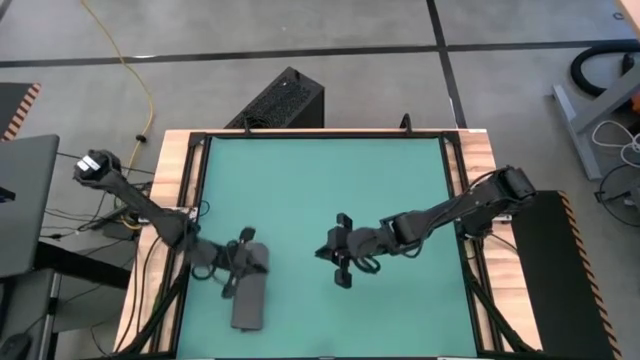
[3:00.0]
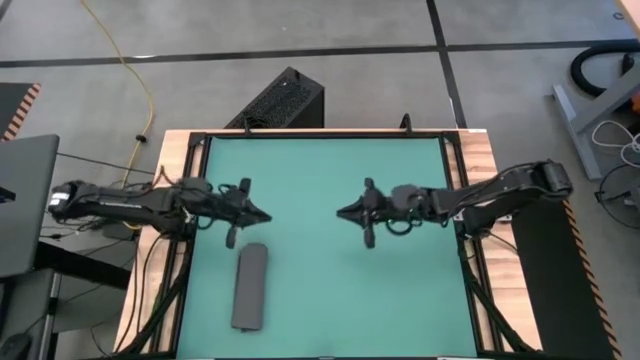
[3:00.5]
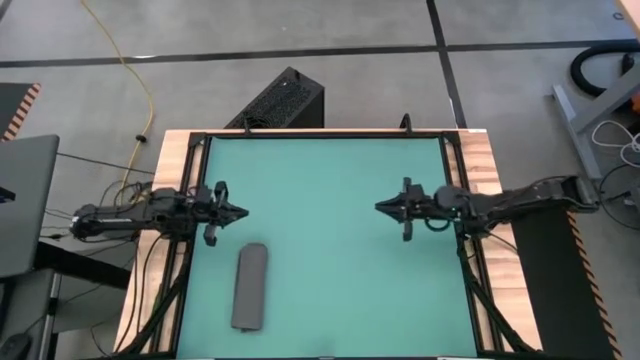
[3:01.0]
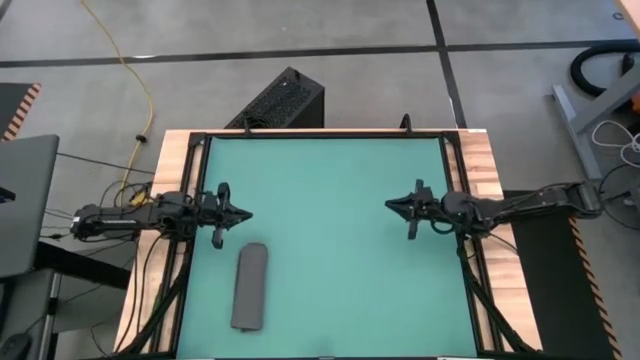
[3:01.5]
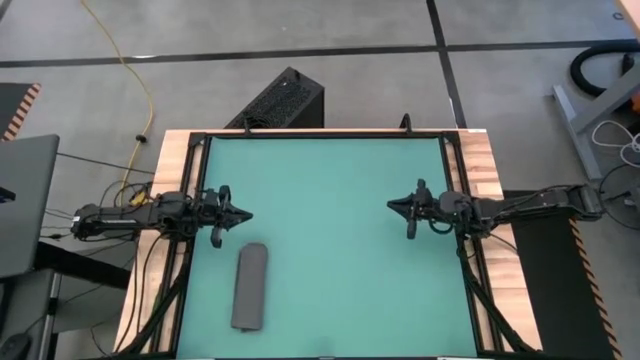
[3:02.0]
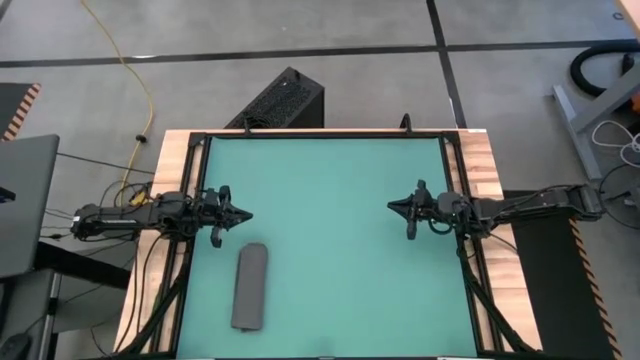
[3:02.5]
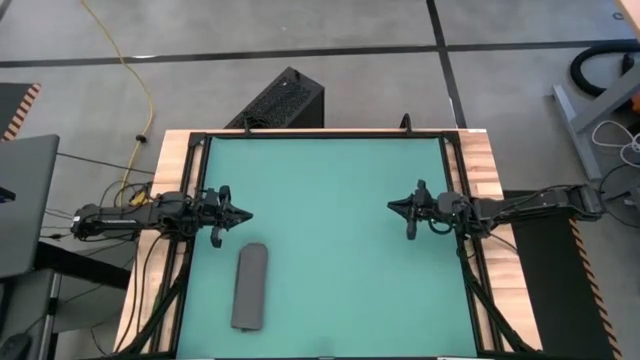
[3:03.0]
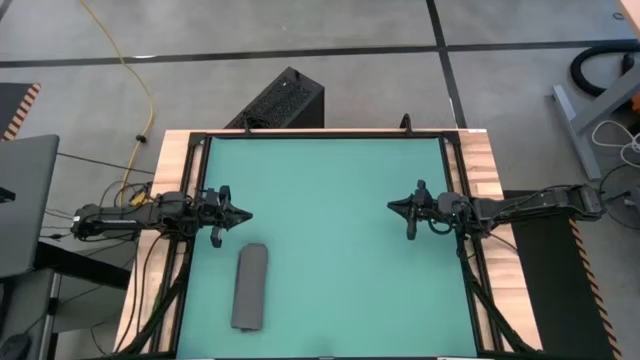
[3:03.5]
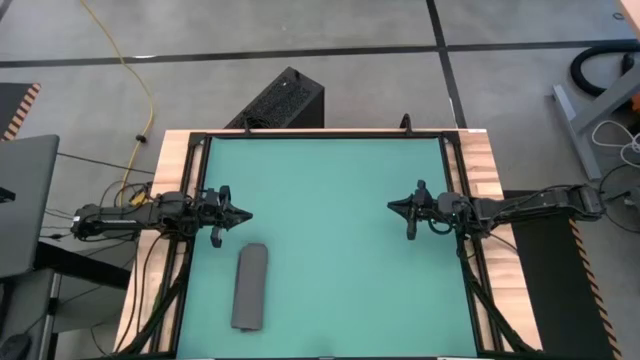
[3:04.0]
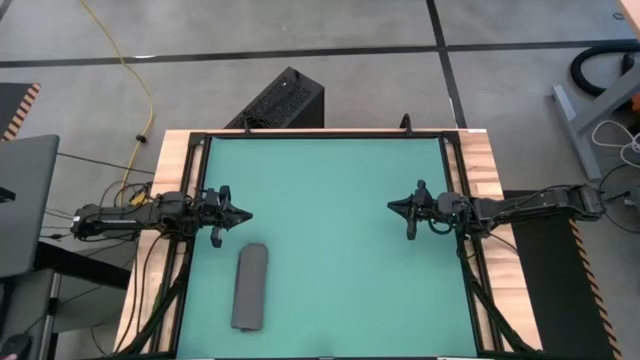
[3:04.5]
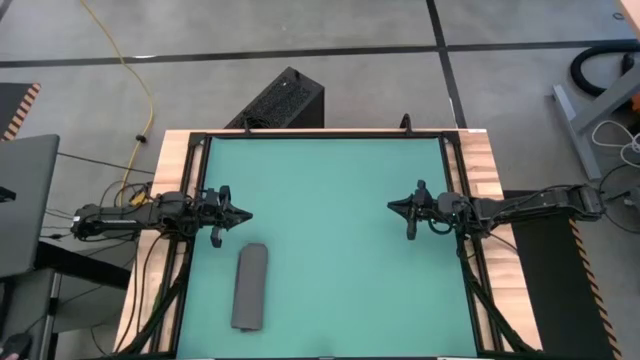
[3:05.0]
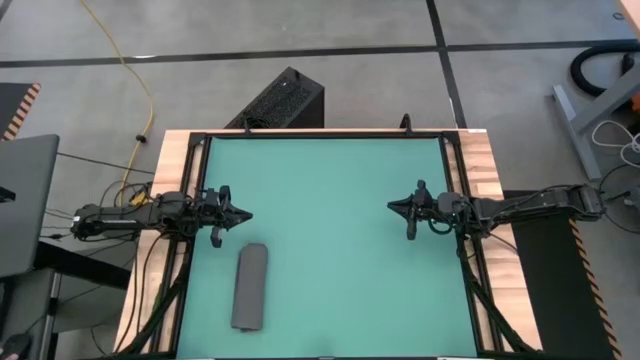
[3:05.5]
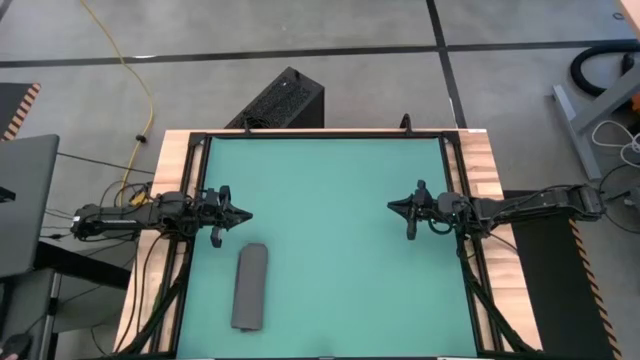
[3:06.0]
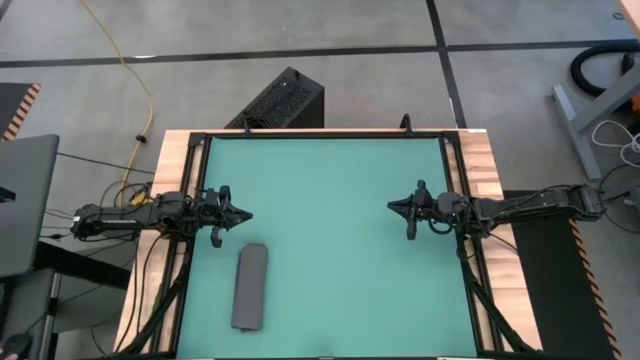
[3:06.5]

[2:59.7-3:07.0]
Task: Roll towel
Return to Home Position

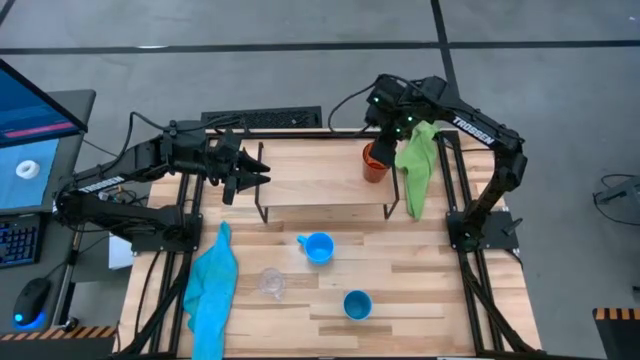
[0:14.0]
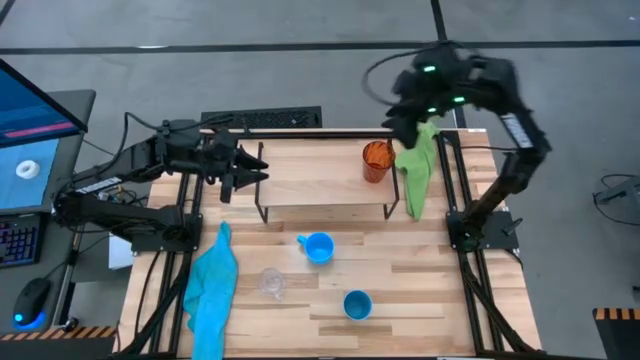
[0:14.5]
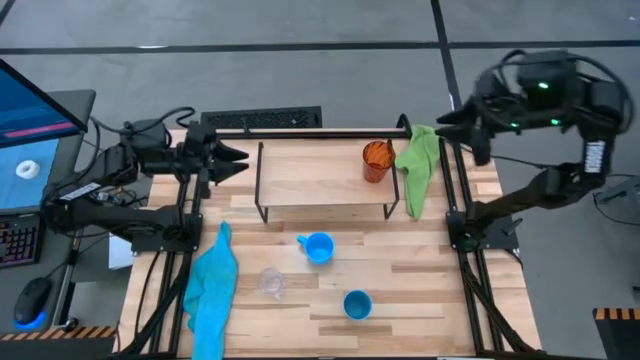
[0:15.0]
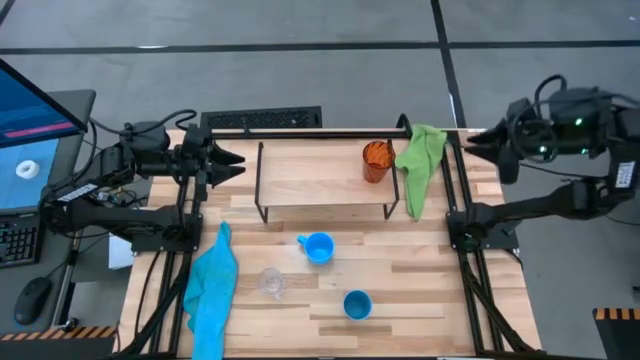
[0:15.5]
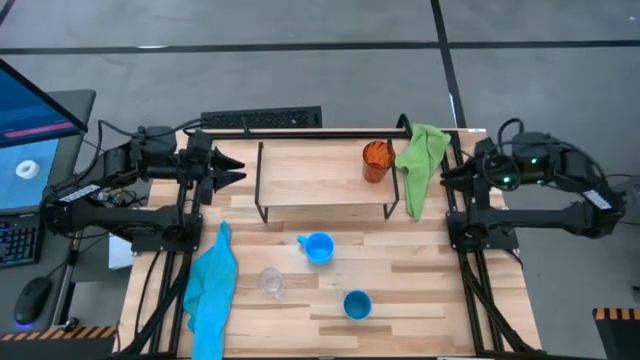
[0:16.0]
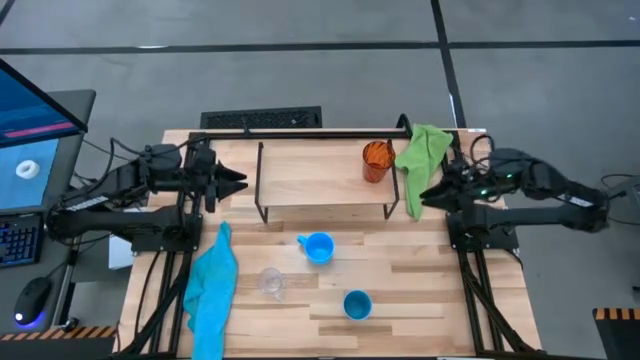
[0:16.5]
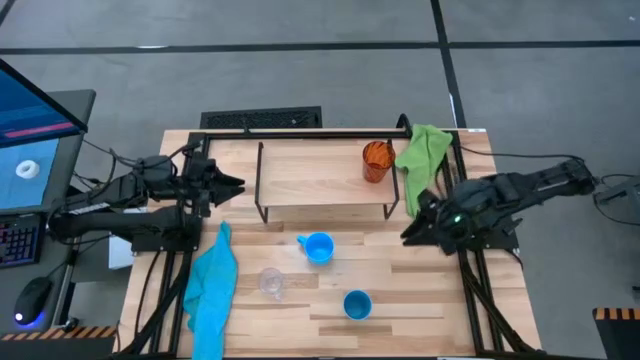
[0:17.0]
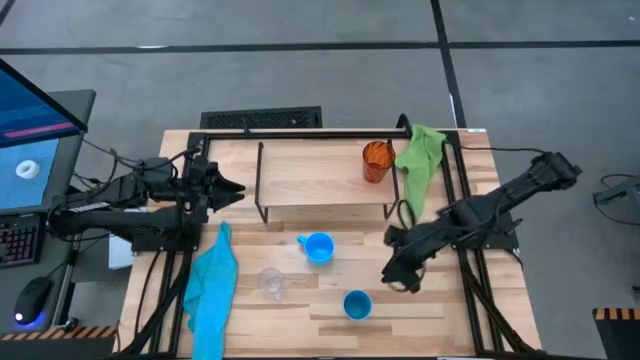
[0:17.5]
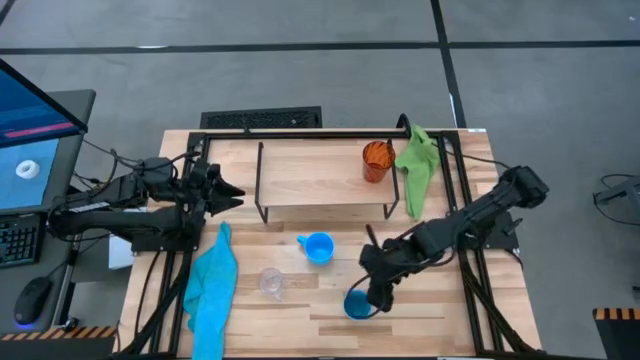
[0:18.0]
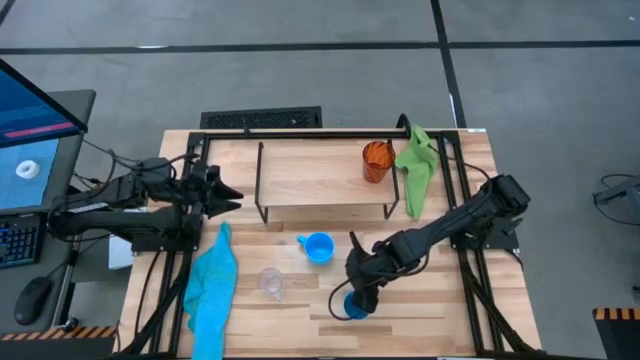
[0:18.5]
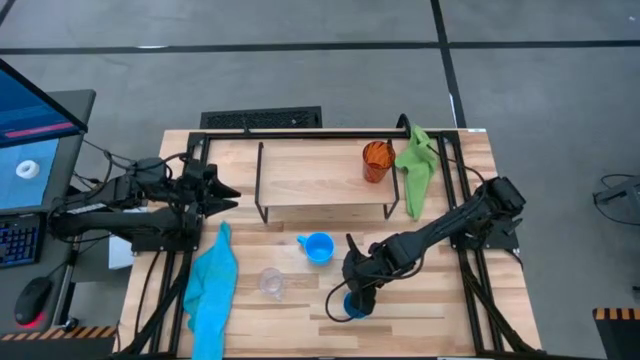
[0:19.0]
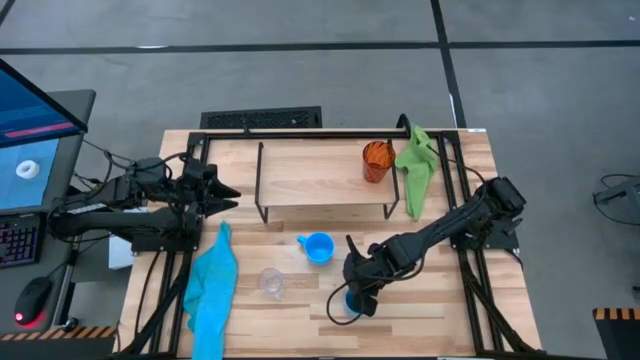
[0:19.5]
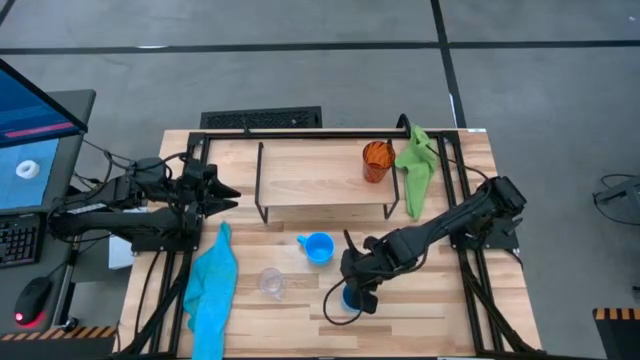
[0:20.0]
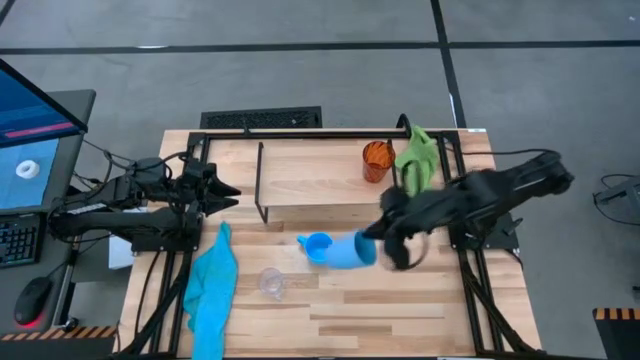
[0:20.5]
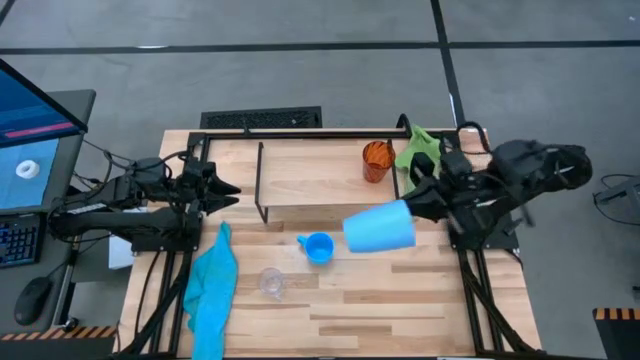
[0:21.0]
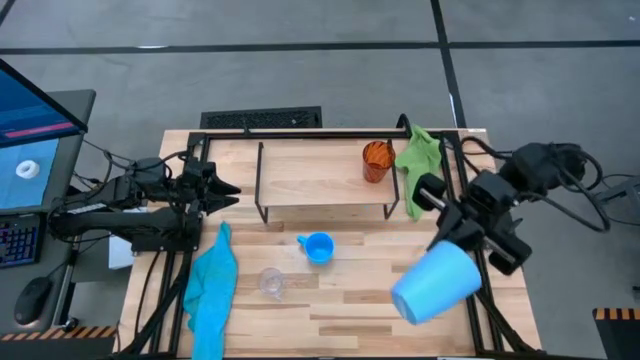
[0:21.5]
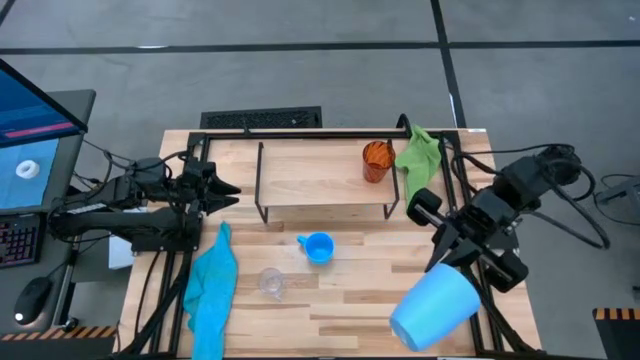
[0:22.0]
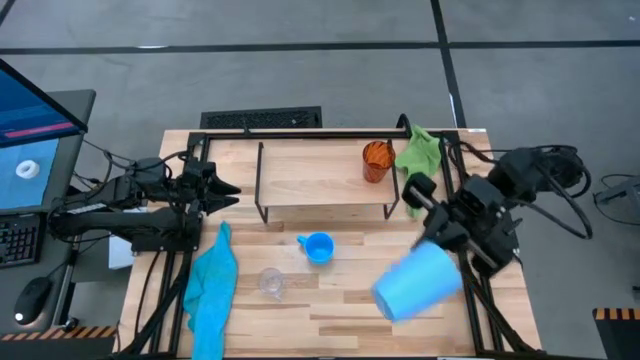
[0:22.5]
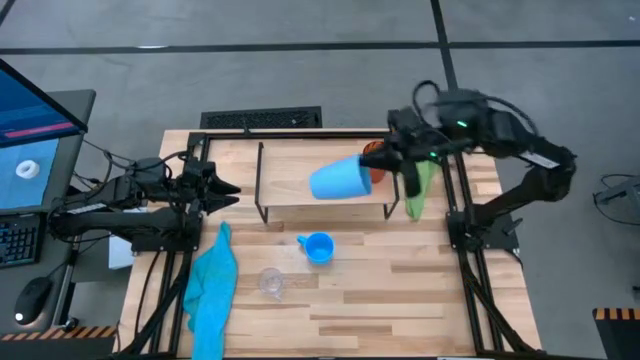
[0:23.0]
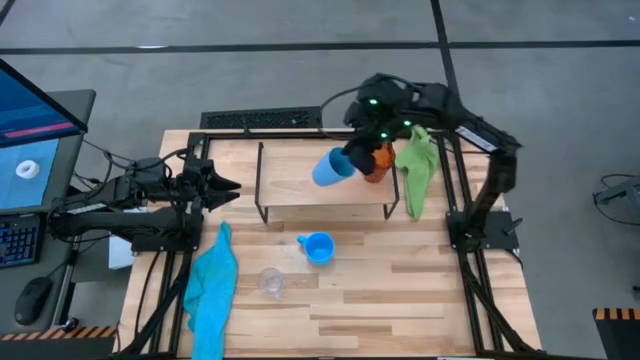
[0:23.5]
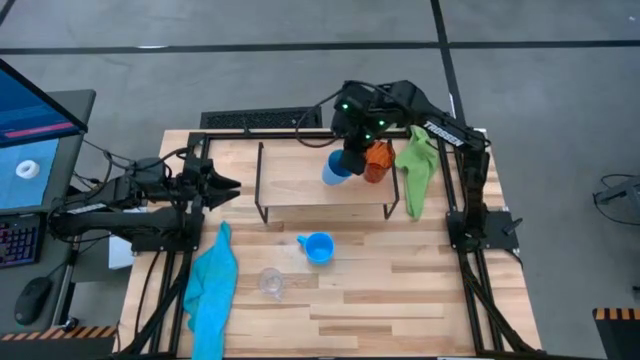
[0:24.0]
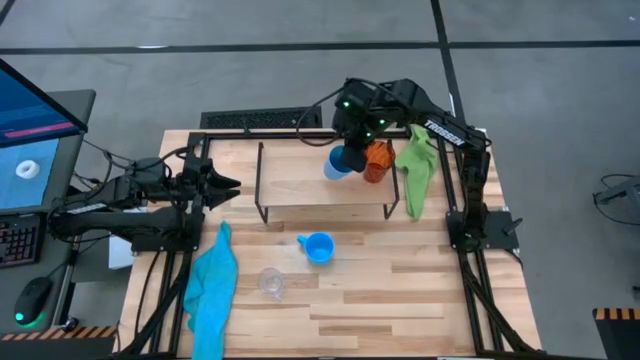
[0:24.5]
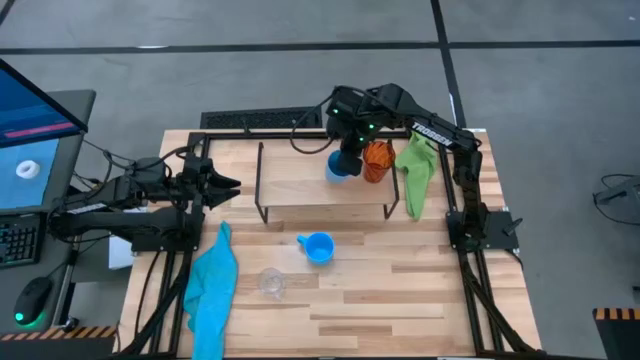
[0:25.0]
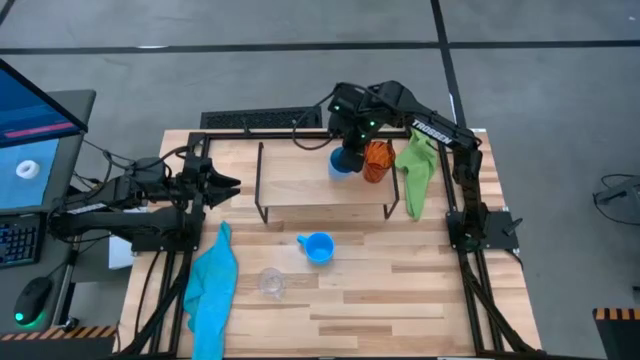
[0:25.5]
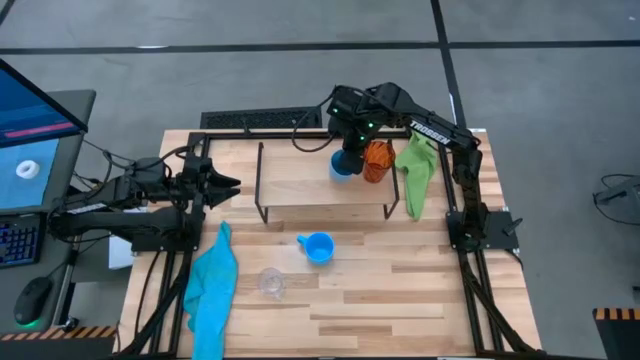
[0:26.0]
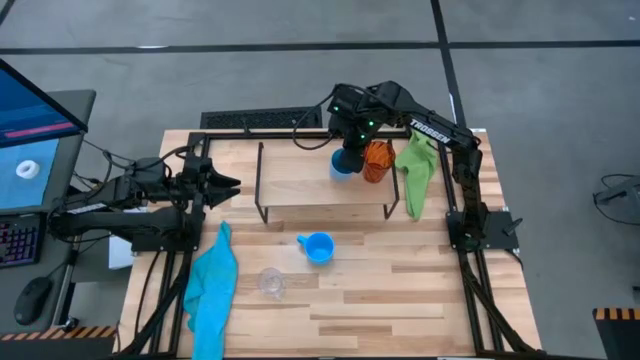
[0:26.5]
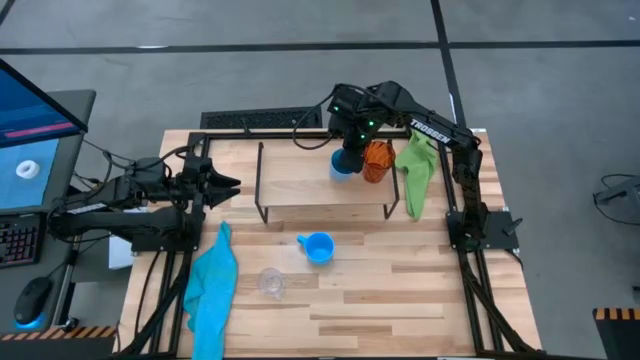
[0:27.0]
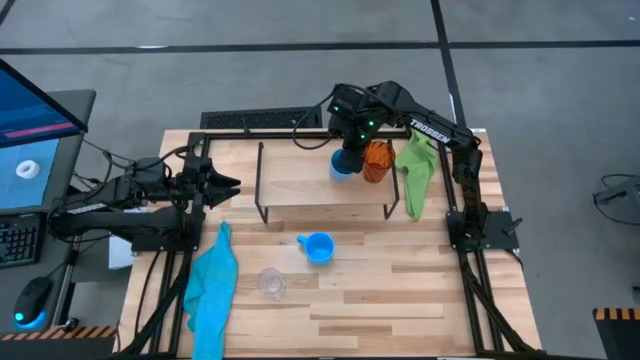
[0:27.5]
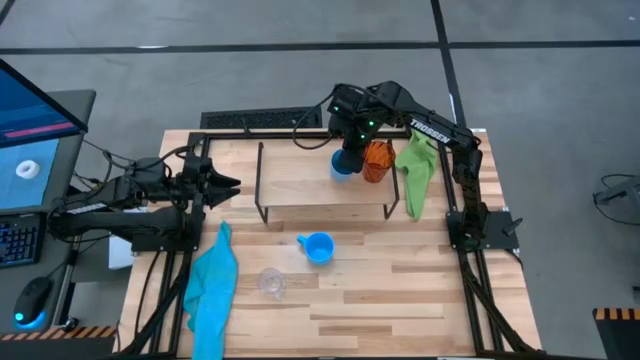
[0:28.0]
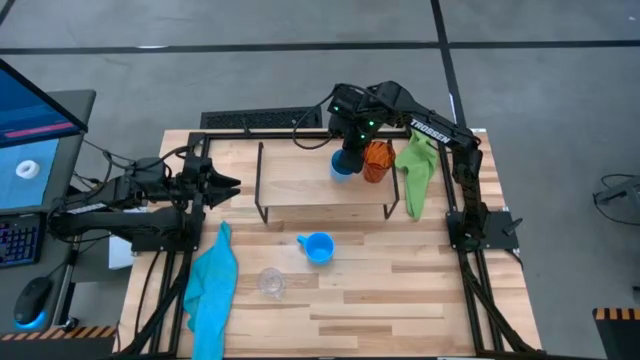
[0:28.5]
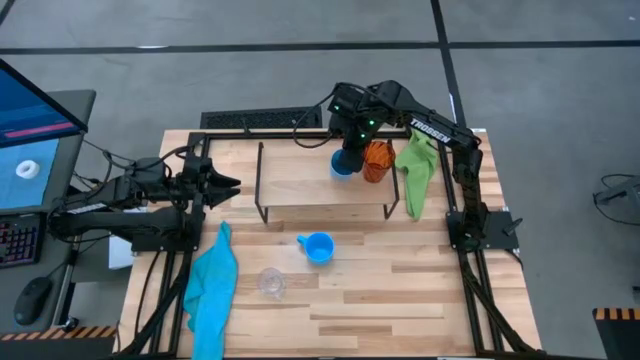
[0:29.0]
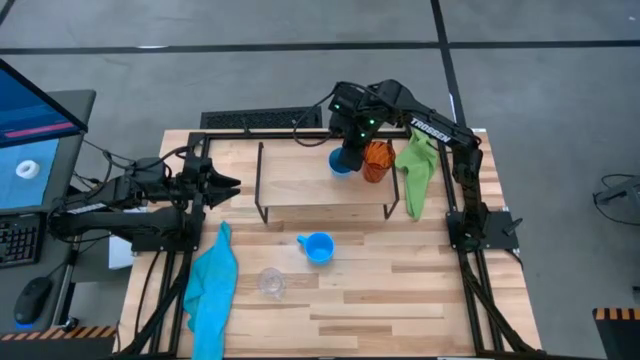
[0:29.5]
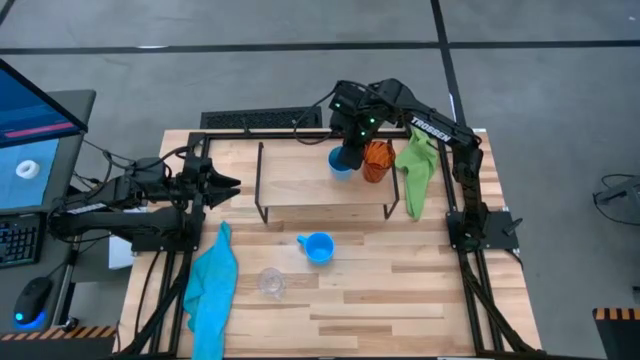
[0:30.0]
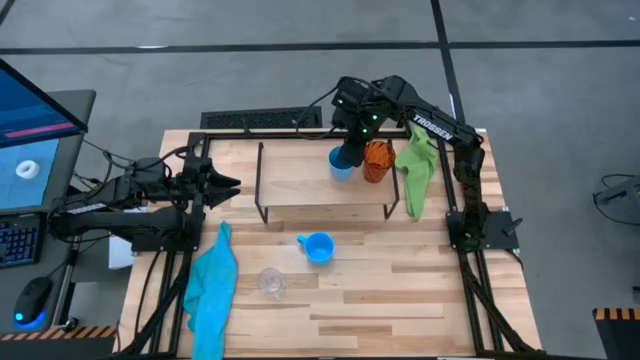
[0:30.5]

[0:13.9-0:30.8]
Task: Stack small to large cups/mugs on shelf
Put the blue cup on the shelf
